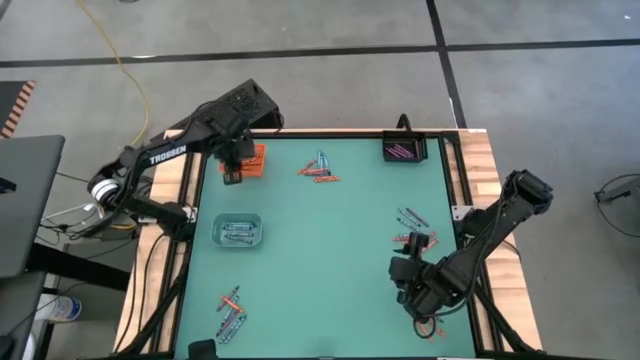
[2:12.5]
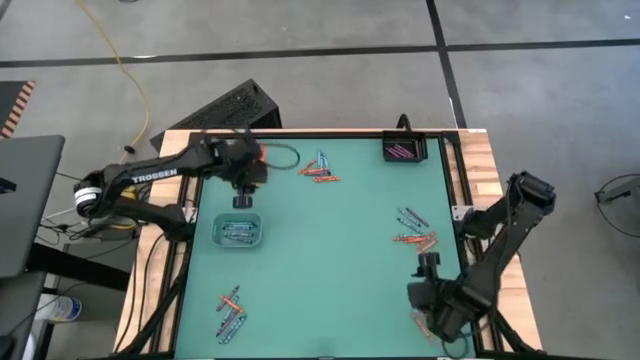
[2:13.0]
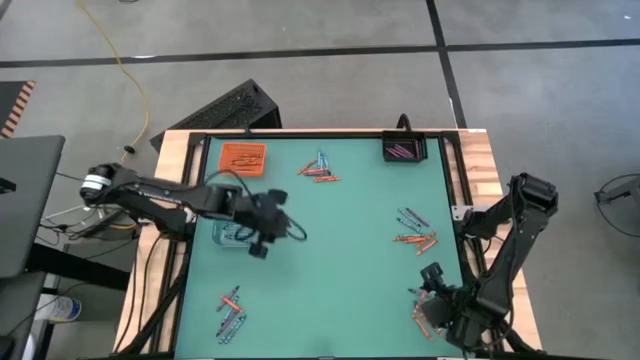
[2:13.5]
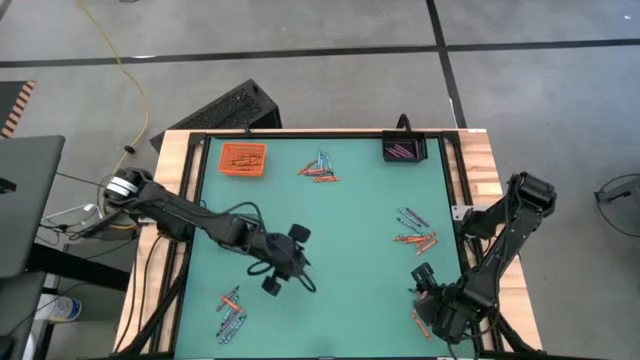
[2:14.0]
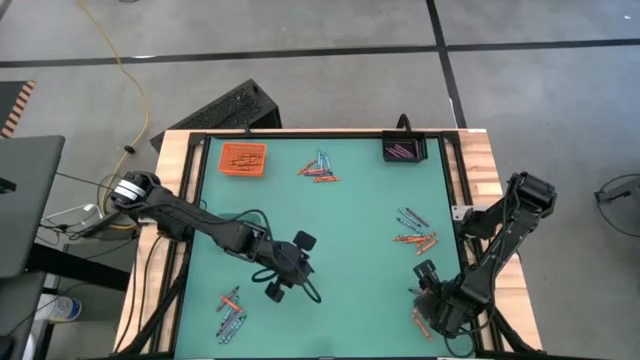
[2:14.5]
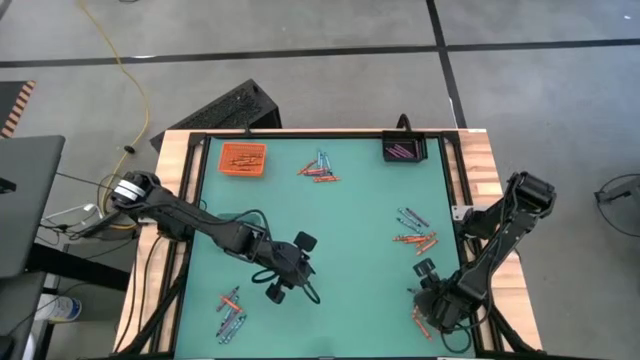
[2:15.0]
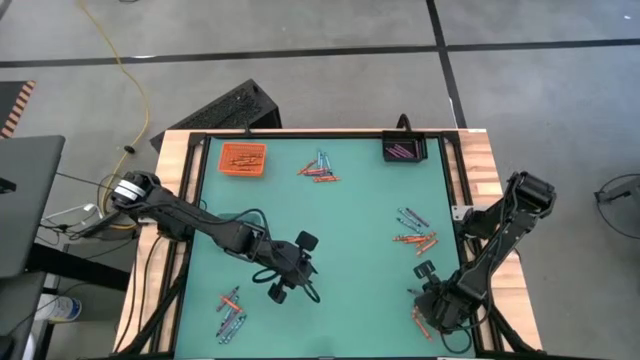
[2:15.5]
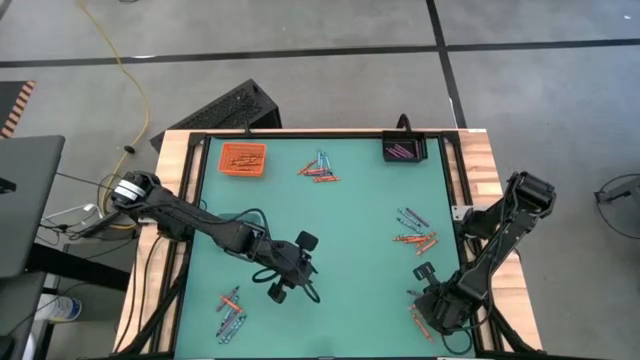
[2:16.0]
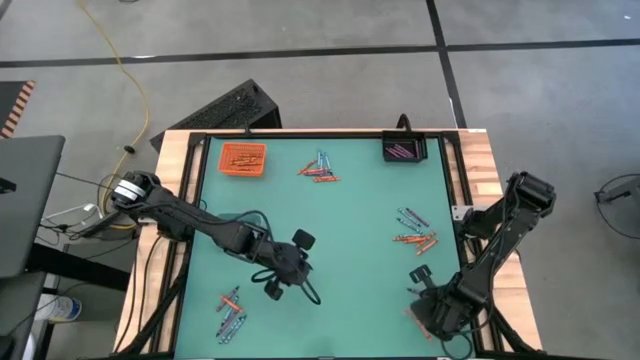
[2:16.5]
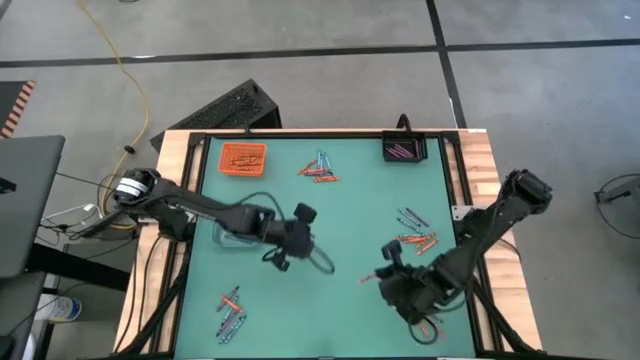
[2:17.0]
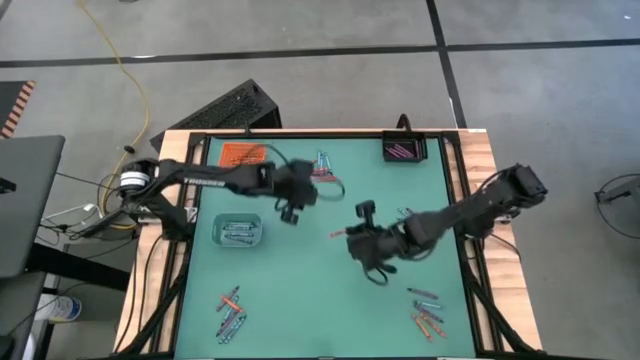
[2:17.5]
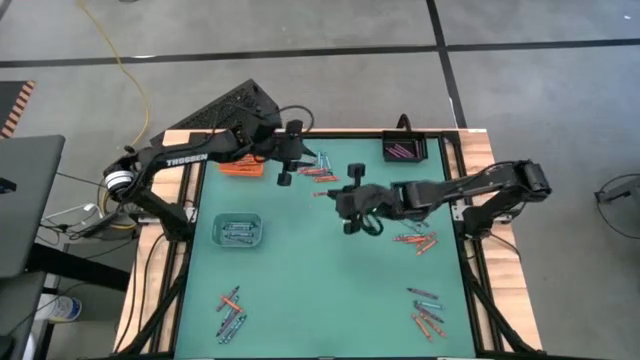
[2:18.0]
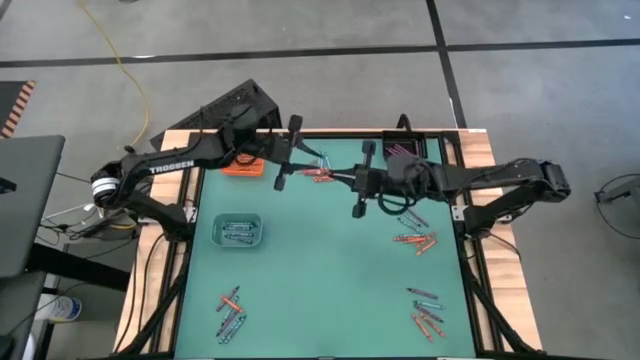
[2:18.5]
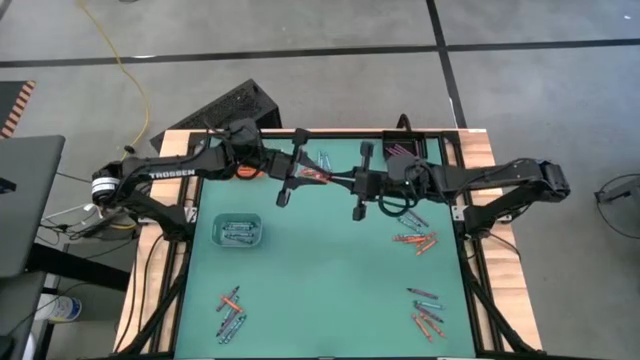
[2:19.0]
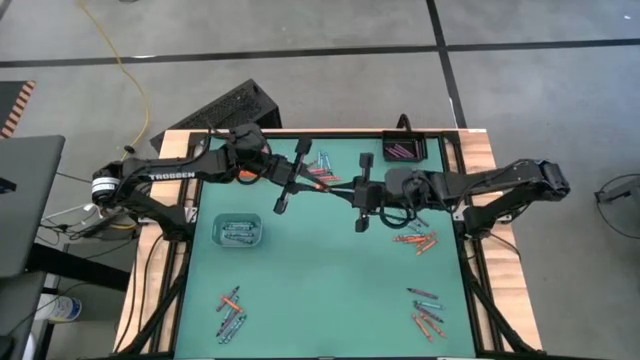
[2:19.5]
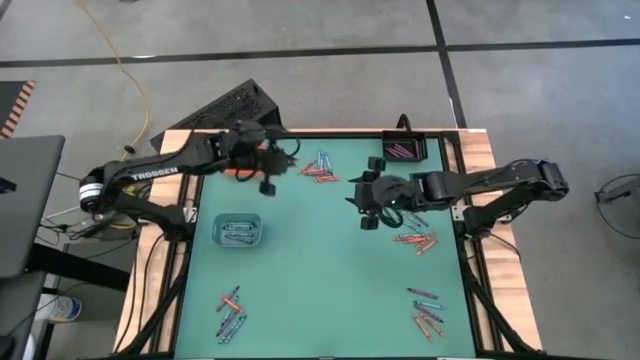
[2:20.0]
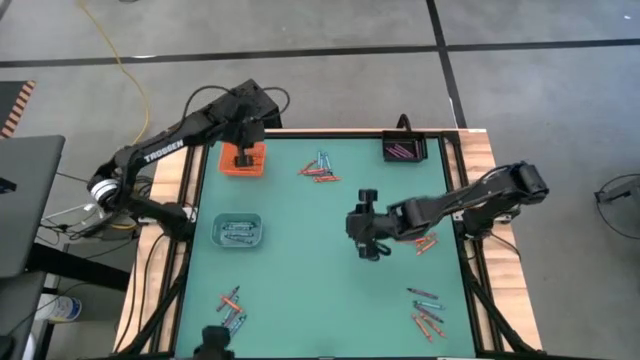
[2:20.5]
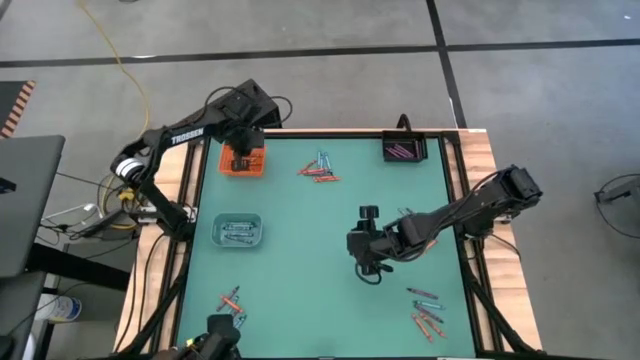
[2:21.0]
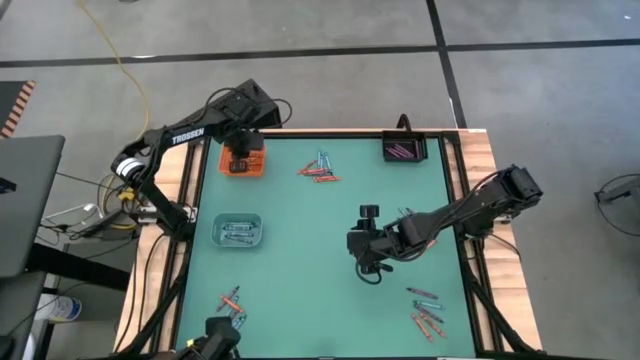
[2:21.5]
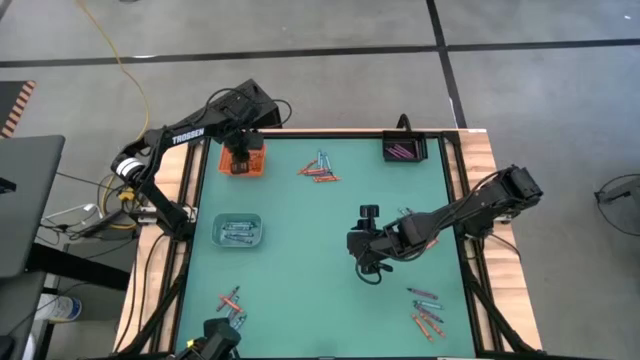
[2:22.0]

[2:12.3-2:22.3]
Task: Sort crayons
Put the orange crayon into the orange basket

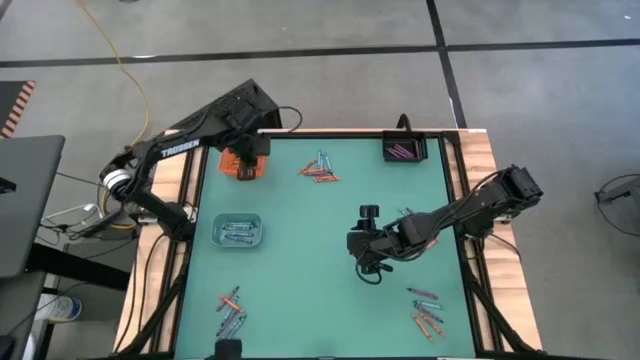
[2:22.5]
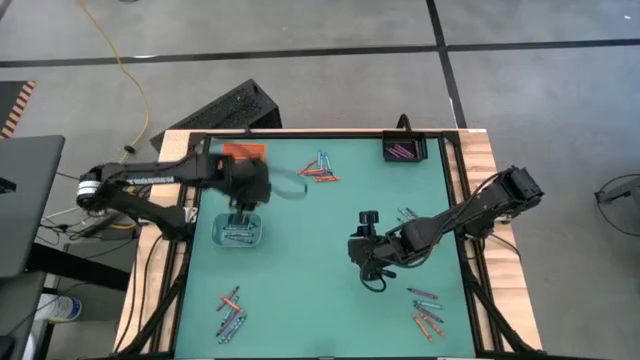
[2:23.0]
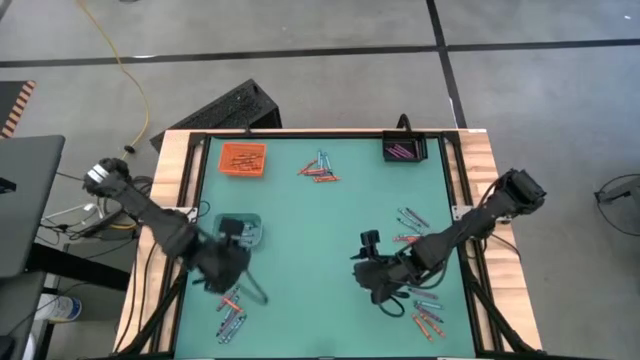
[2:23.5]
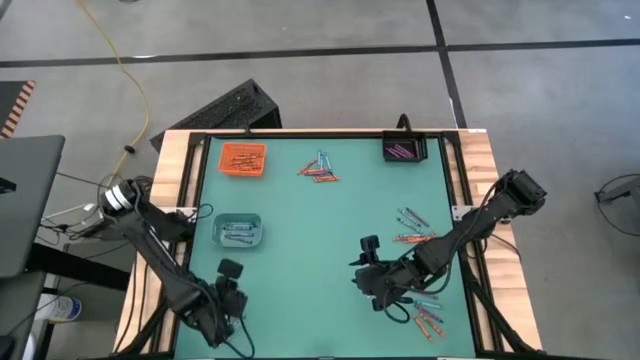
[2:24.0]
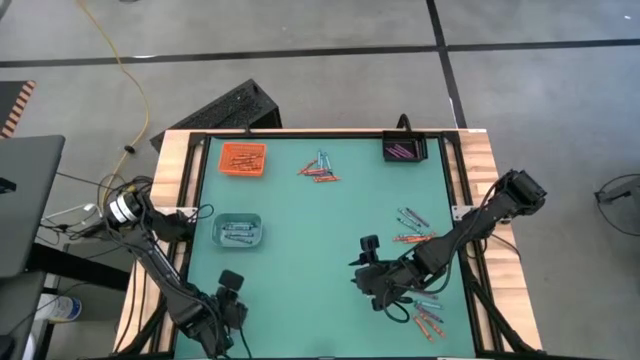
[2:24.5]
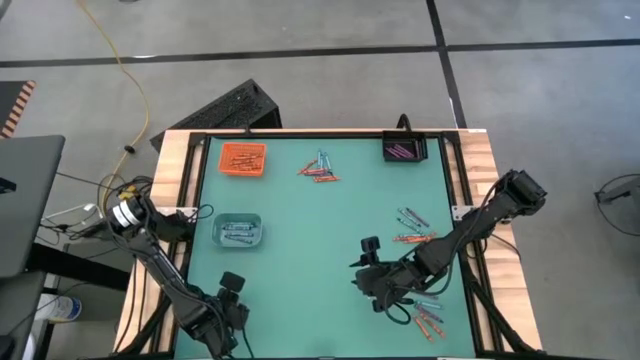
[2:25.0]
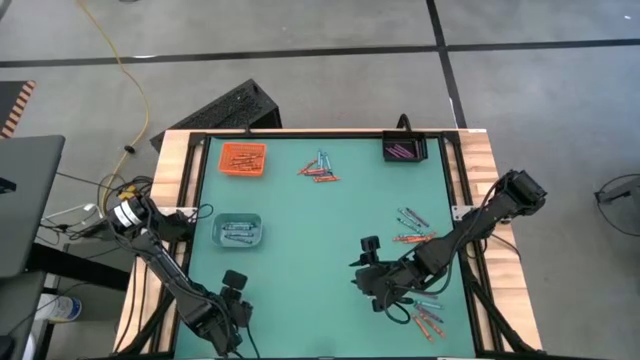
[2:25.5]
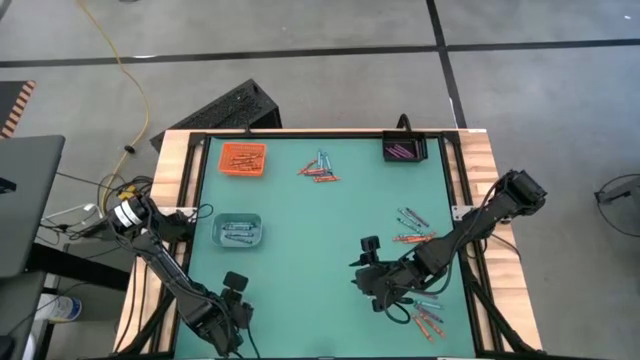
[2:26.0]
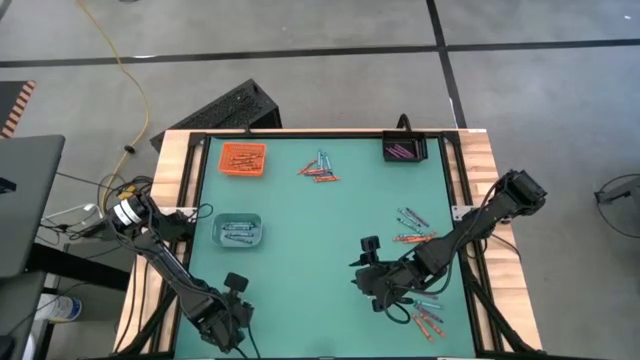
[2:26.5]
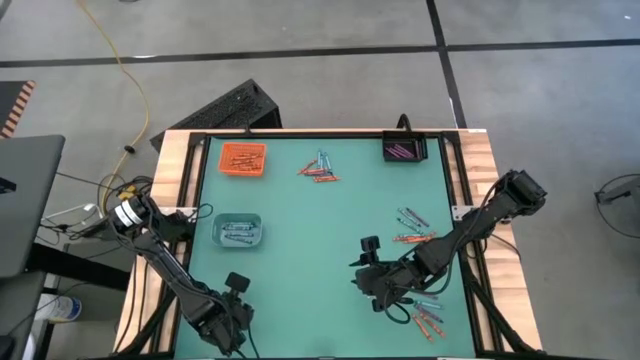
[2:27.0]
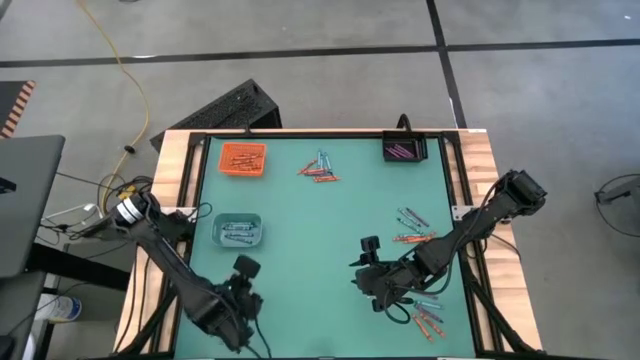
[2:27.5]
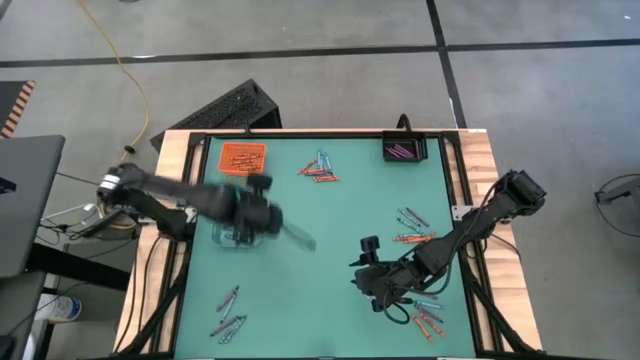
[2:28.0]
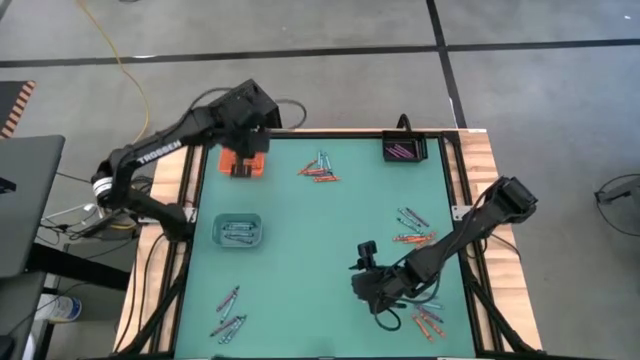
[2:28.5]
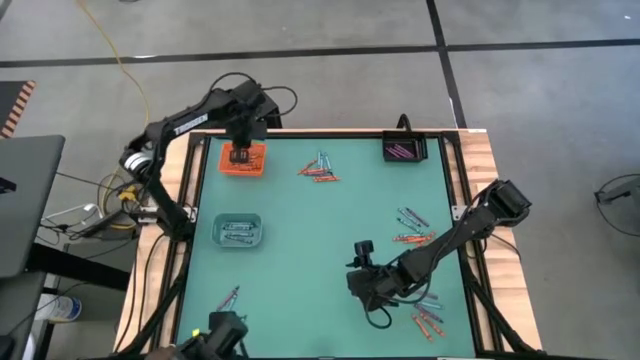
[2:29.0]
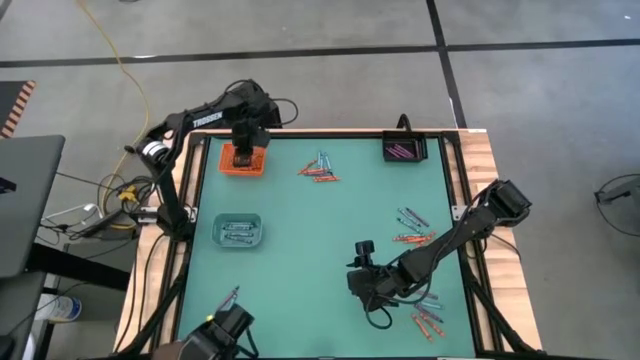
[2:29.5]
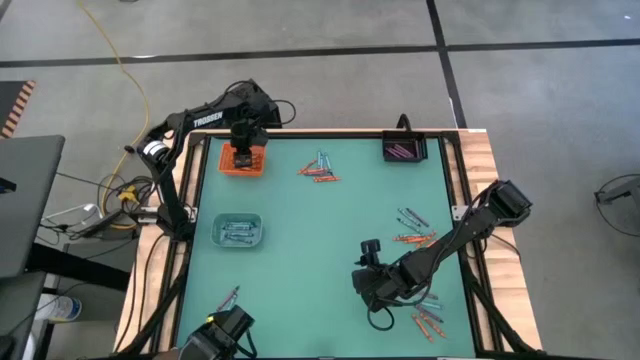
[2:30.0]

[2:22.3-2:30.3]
Put the orange crayon into the orange basket

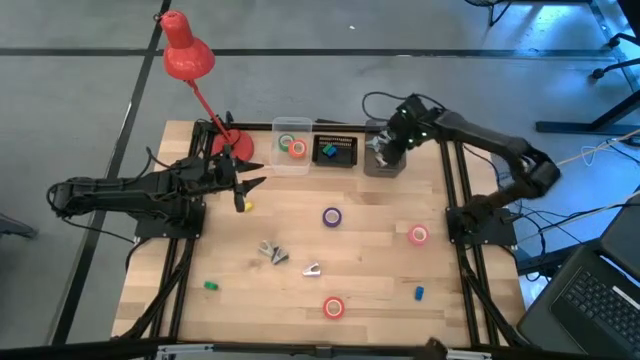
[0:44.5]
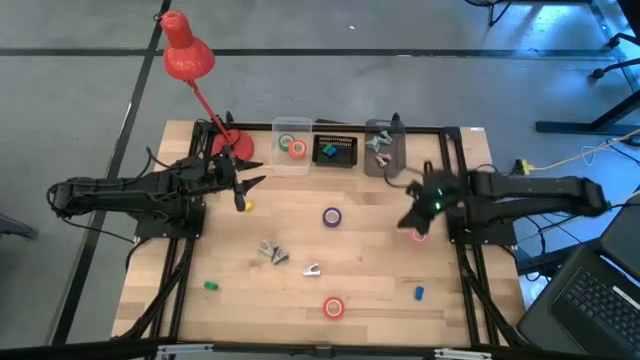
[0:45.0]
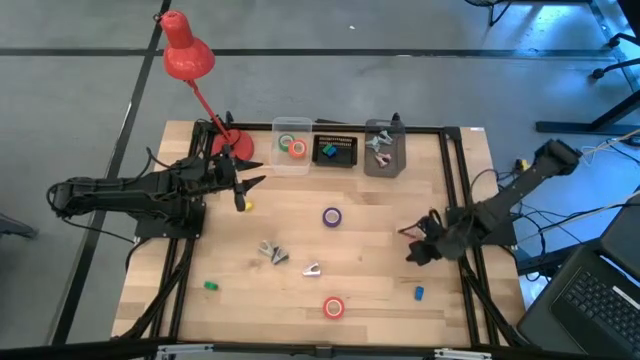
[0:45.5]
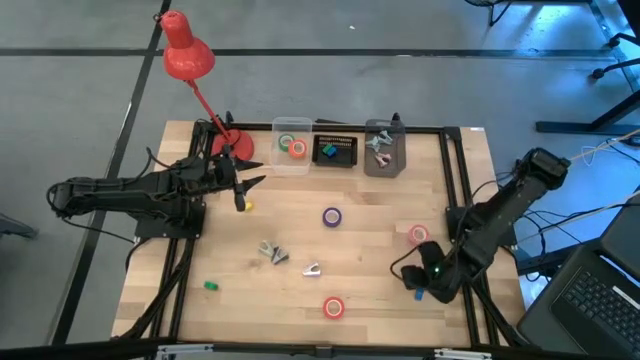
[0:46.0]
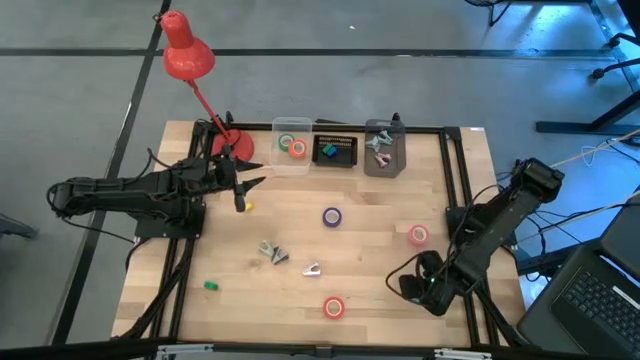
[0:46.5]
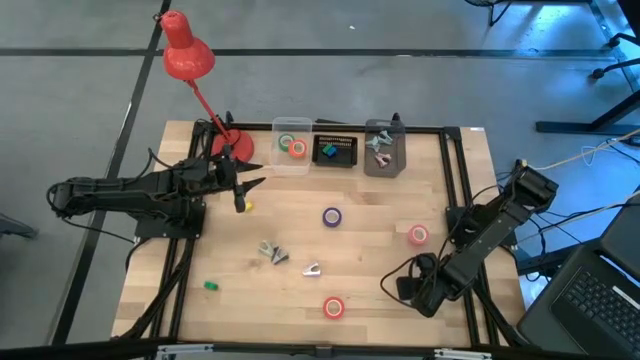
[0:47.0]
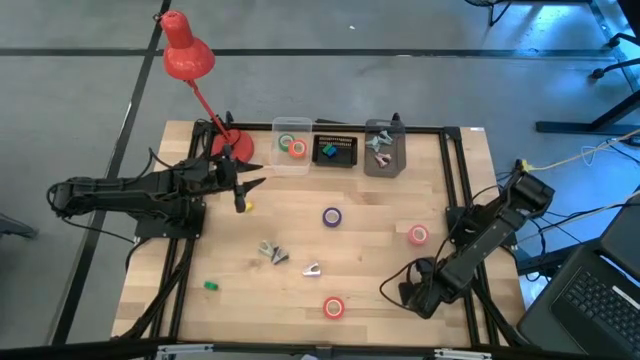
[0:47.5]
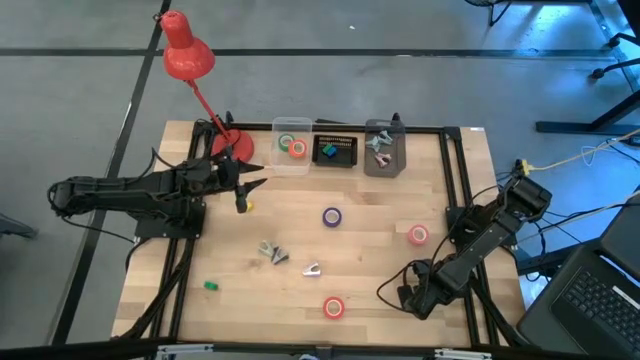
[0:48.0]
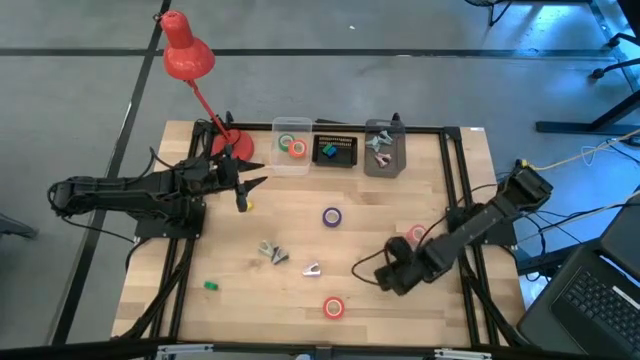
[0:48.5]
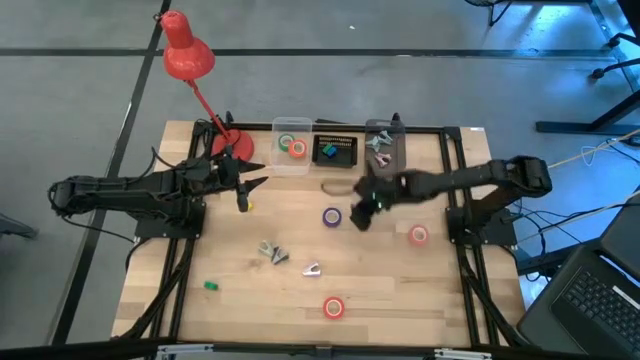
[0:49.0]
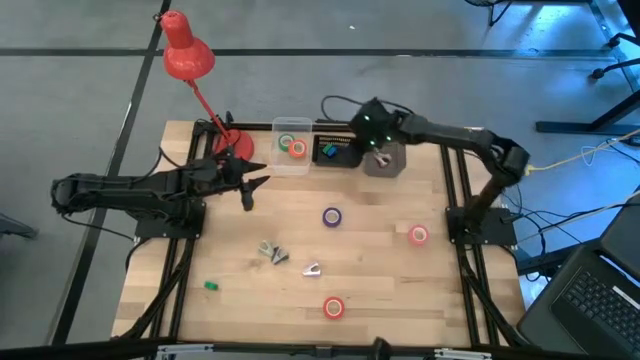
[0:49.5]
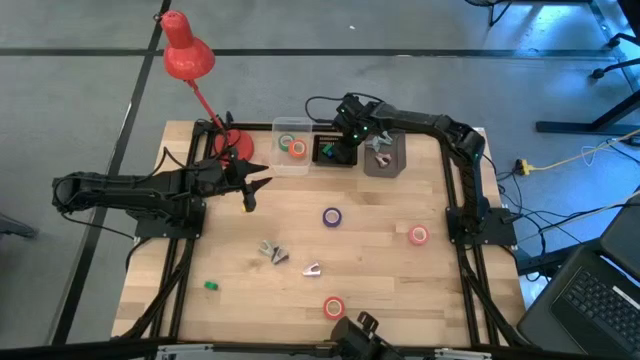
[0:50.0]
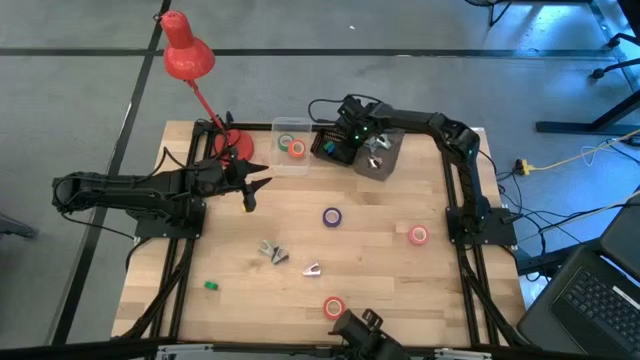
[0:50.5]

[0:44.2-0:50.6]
Task: Pick and place Stapler, Stapler remover, tape
Put the blue stapler into the left black bin
